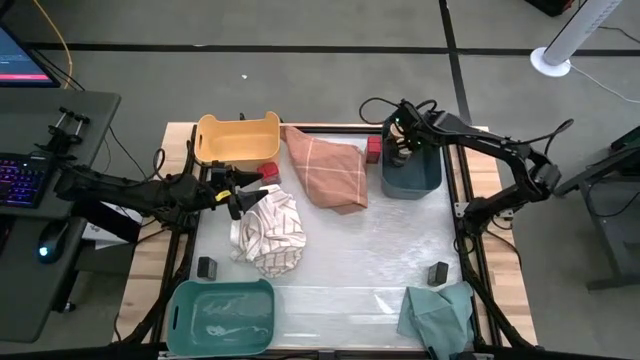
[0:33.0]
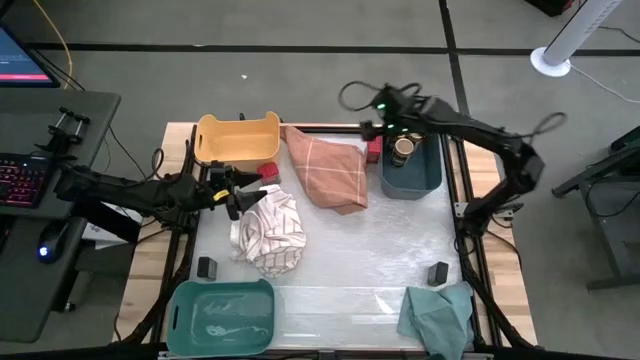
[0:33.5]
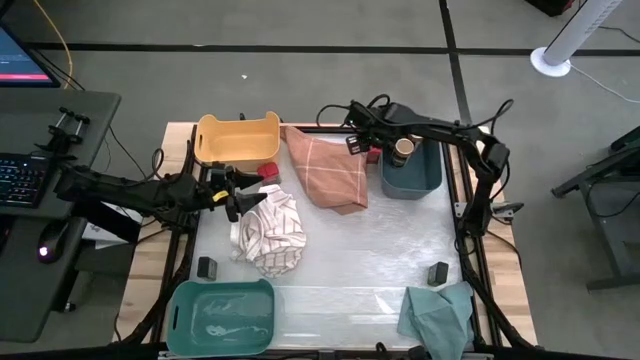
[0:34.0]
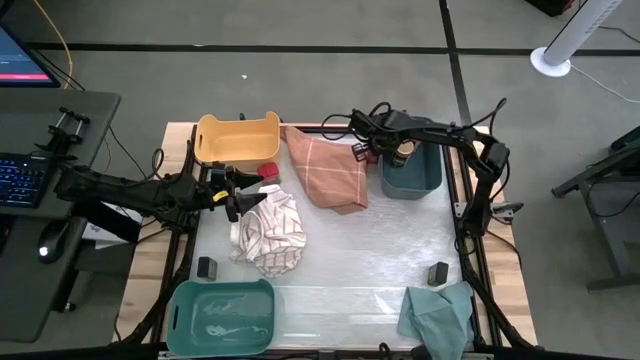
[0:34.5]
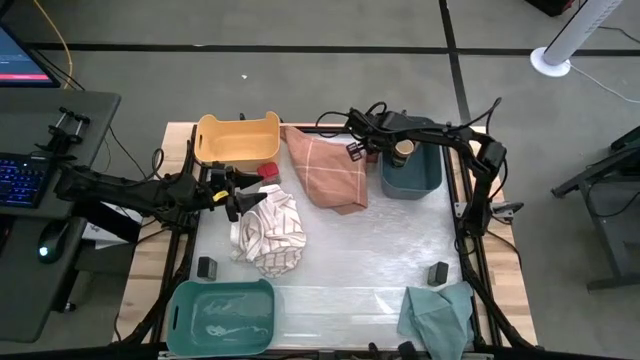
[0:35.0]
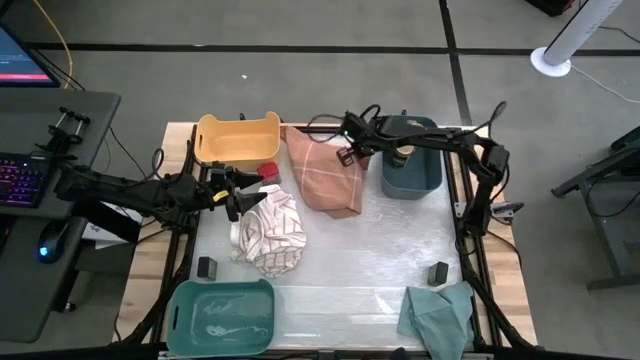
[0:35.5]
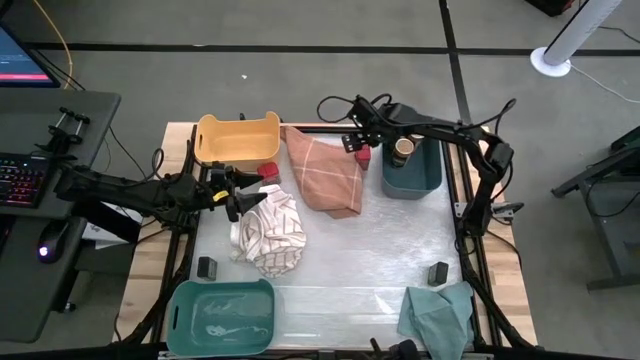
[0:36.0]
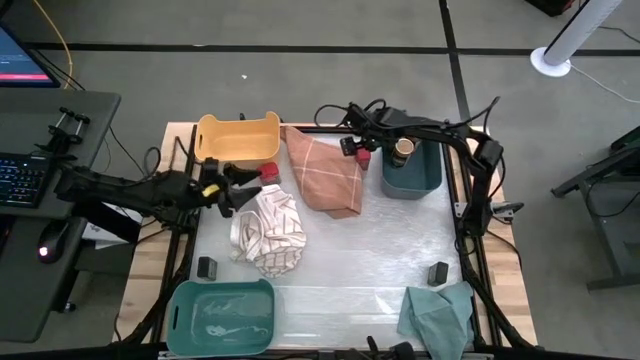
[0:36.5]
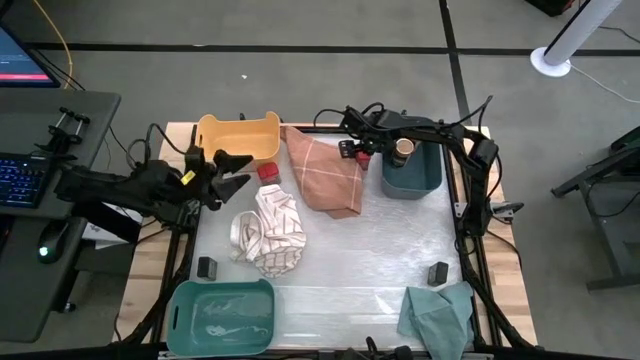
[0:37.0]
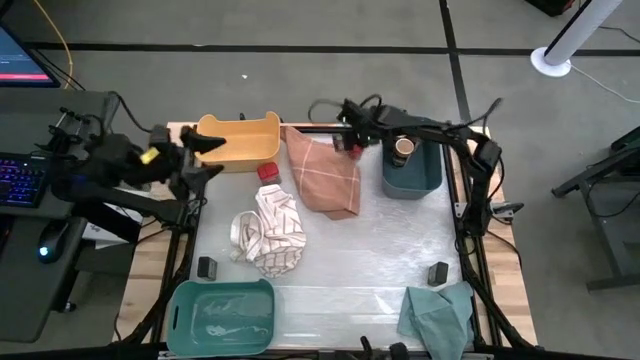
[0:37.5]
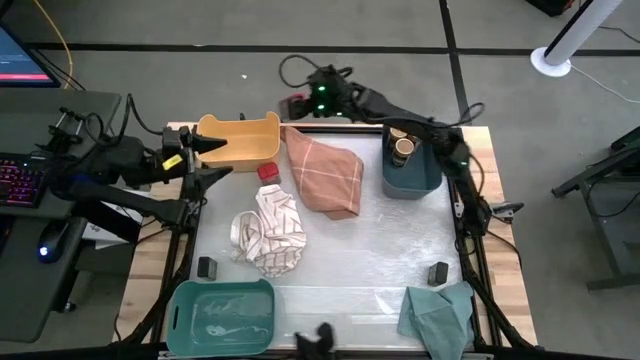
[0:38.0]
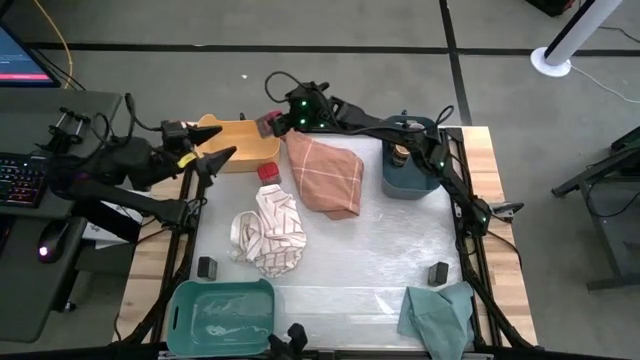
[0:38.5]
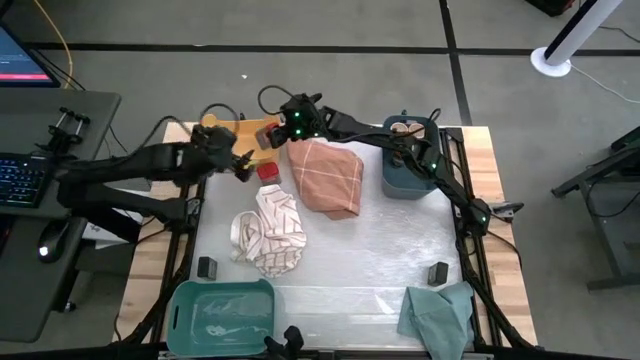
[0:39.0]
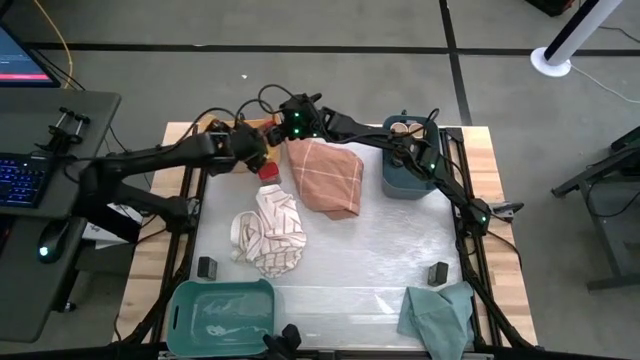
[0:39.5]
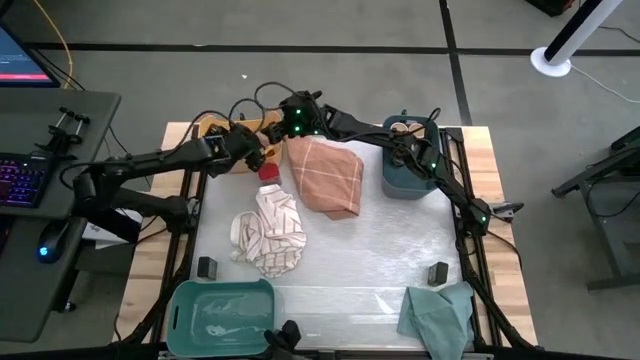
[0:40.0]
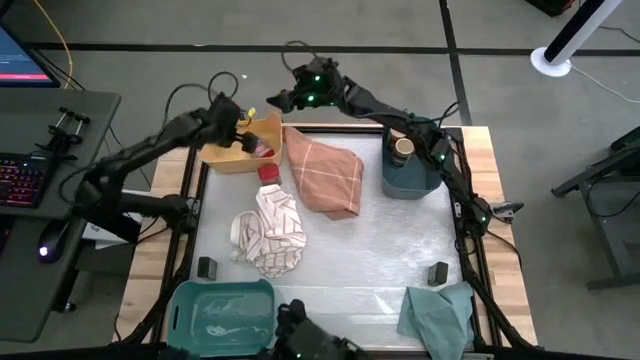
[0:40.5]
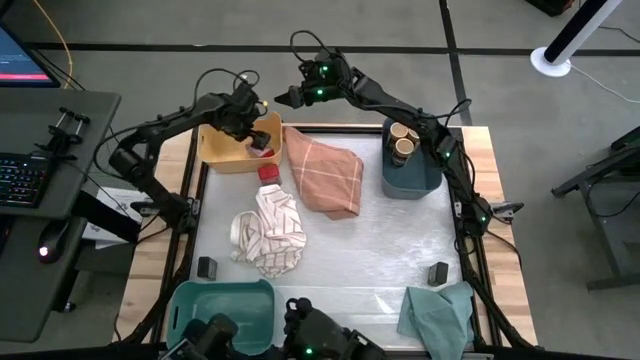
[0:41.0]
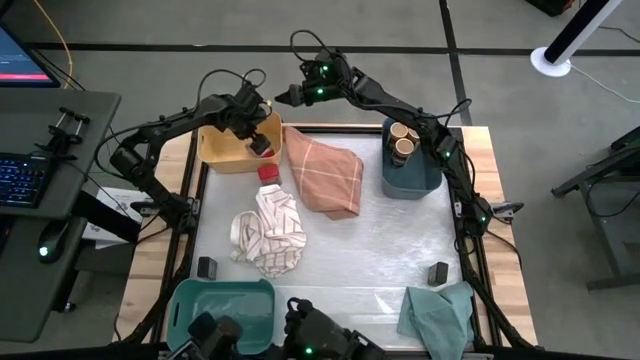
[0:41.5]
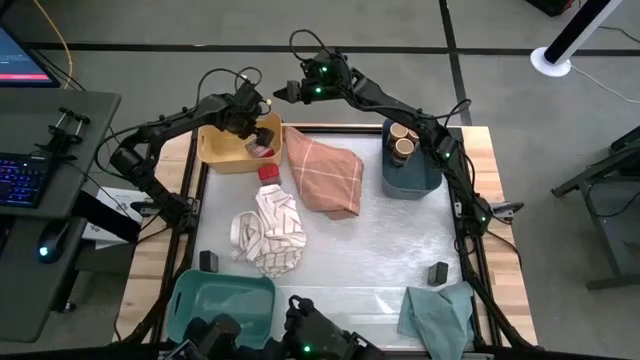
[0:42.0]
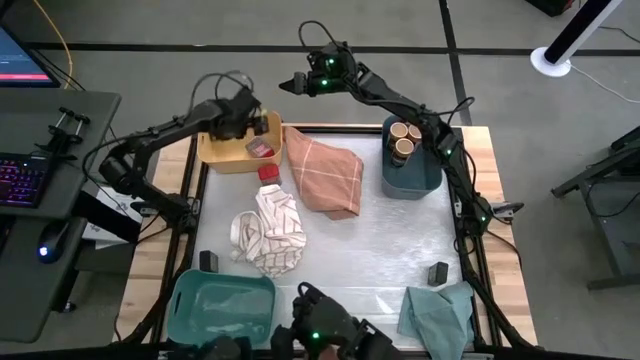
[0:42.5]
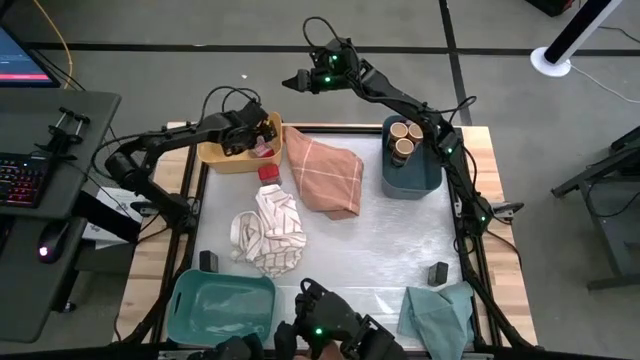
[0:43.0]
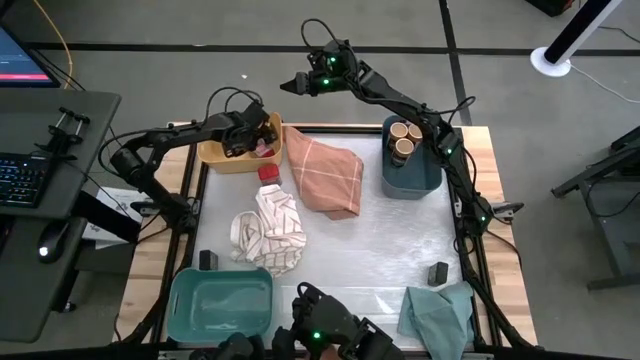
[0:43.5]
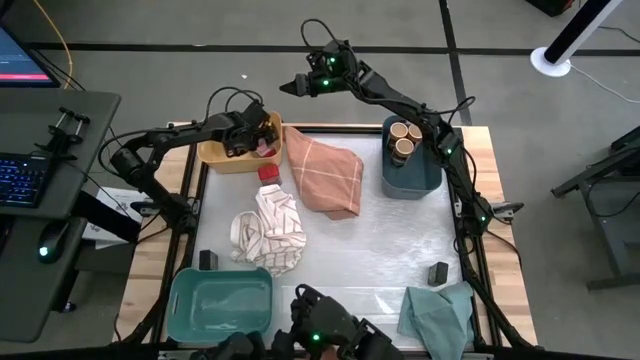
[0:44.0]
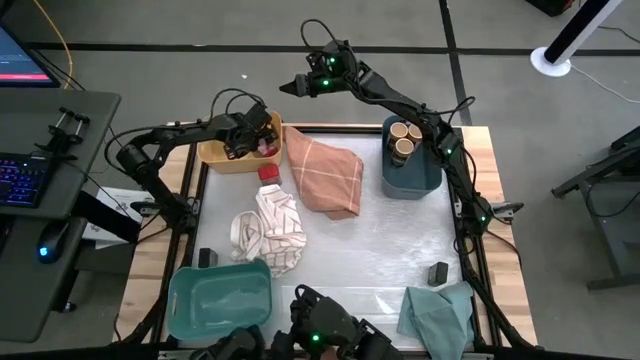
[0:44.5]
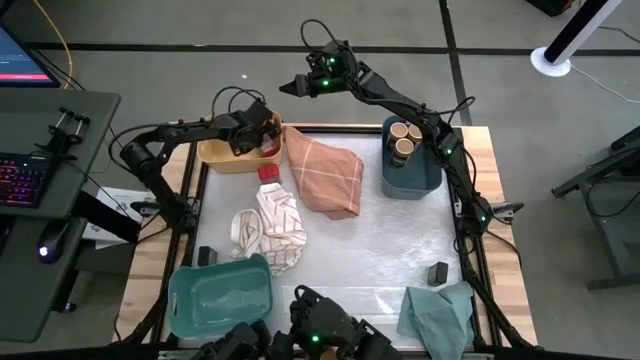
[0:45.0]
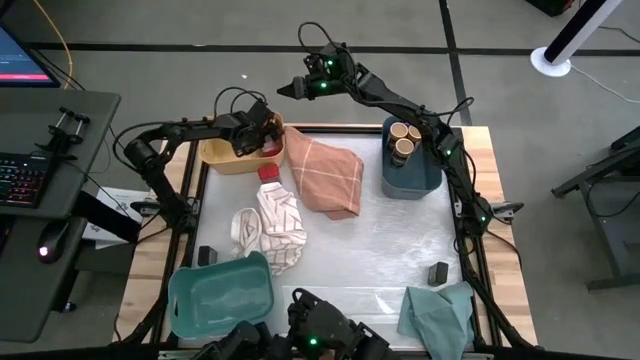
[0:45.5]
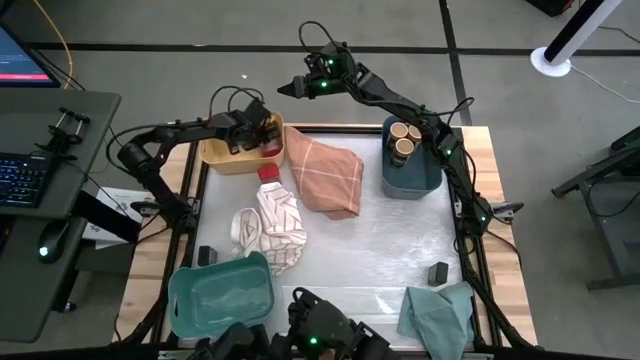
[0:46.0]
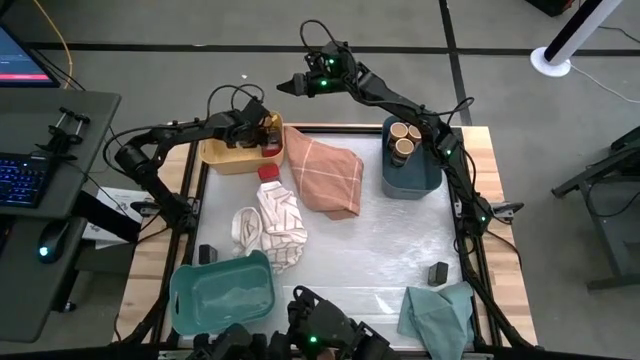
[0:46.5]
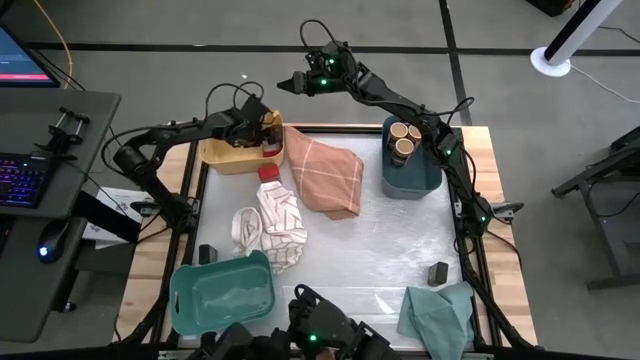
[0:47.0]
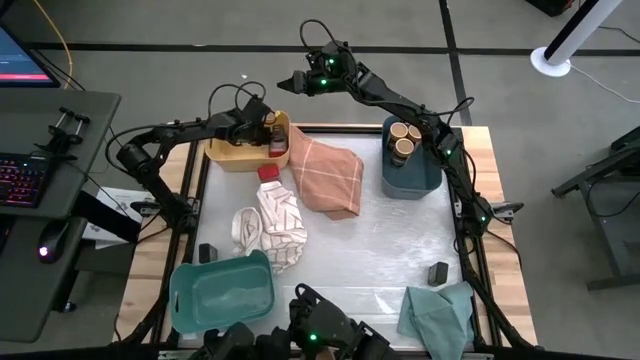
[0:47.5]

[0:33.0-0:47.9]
Task: Sort spices by type
Put the right red seasoning can into the yellow bin

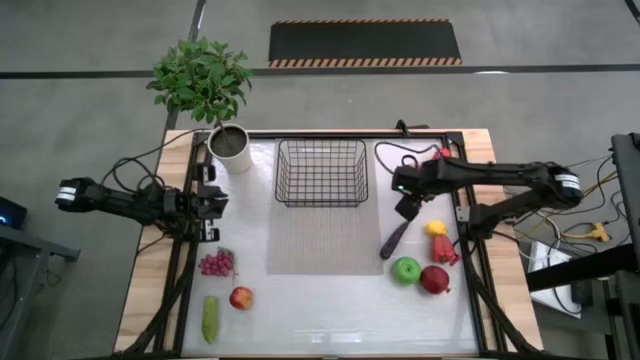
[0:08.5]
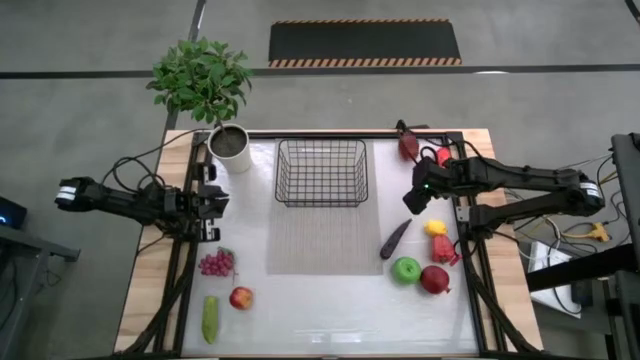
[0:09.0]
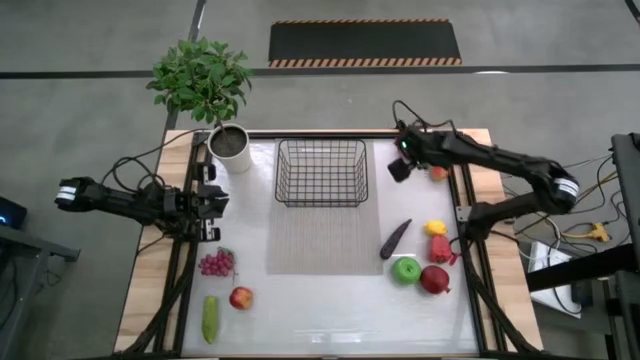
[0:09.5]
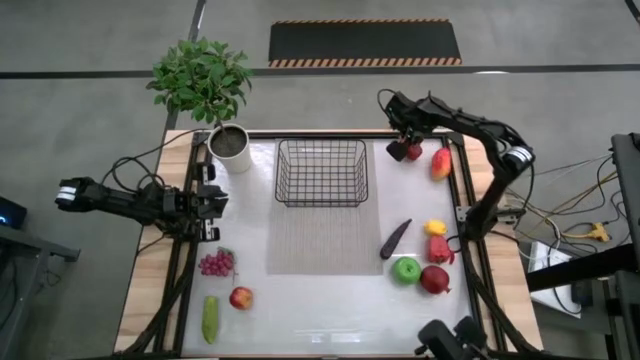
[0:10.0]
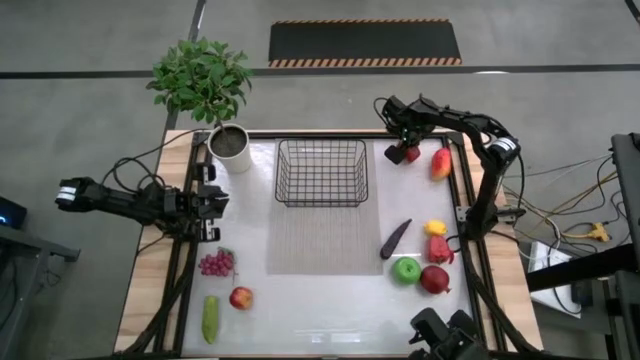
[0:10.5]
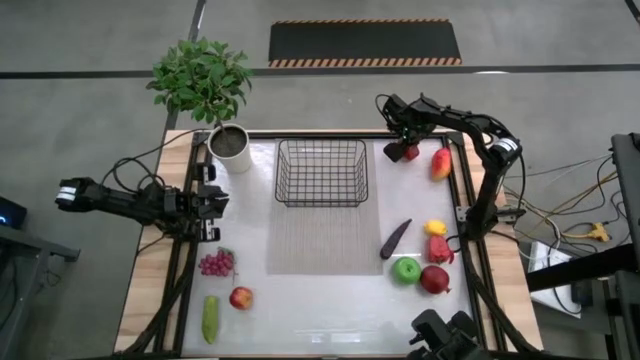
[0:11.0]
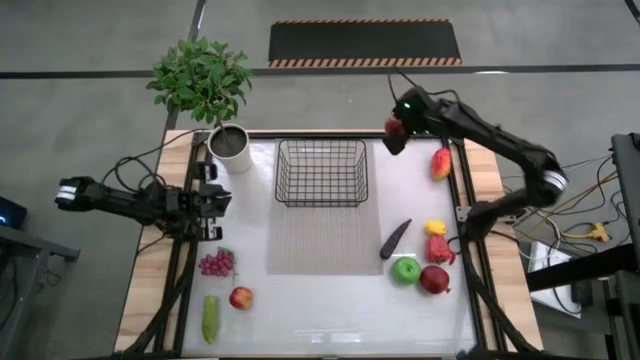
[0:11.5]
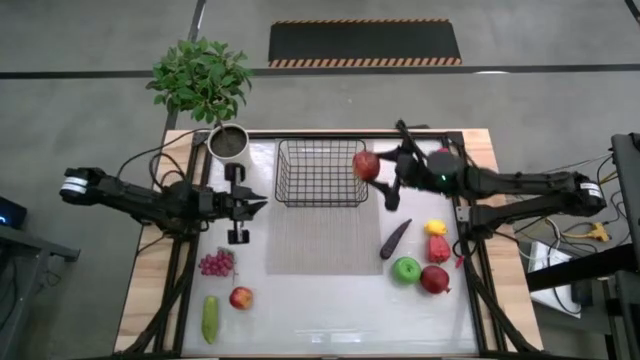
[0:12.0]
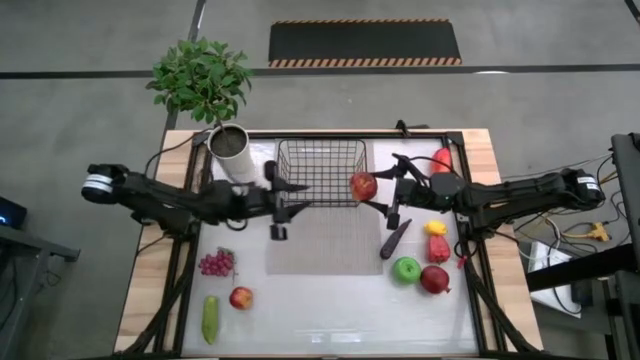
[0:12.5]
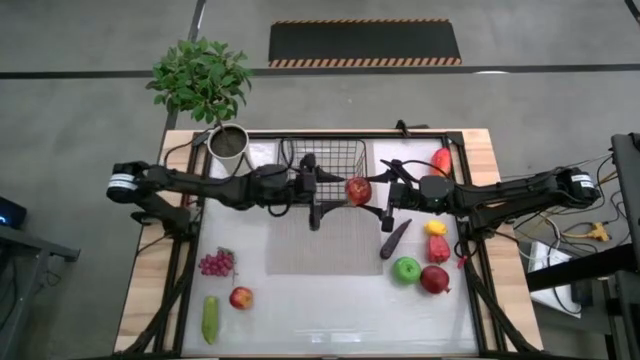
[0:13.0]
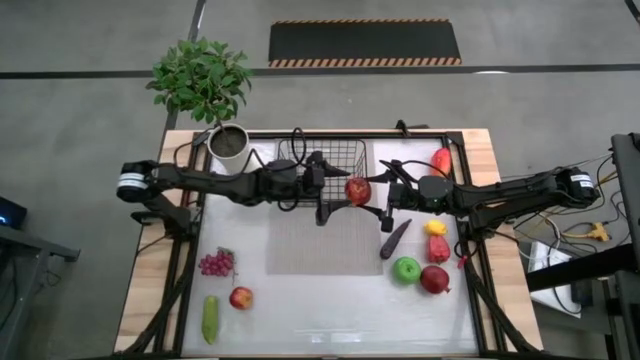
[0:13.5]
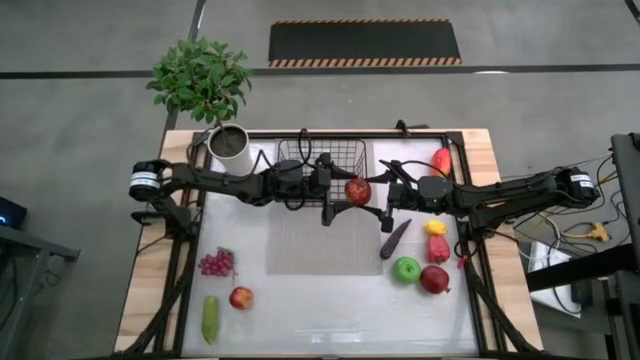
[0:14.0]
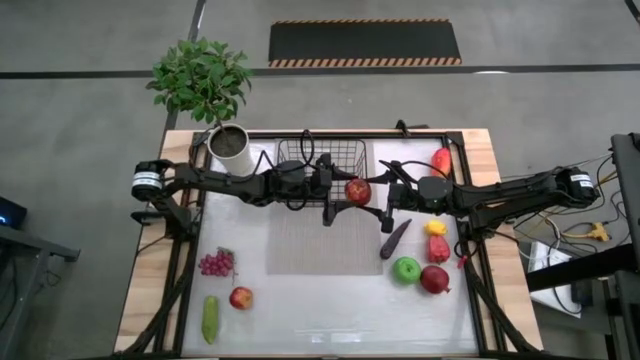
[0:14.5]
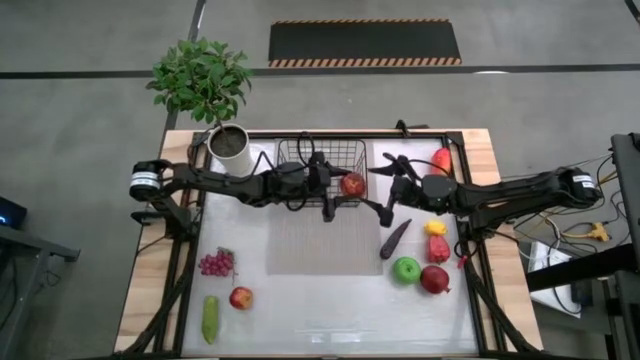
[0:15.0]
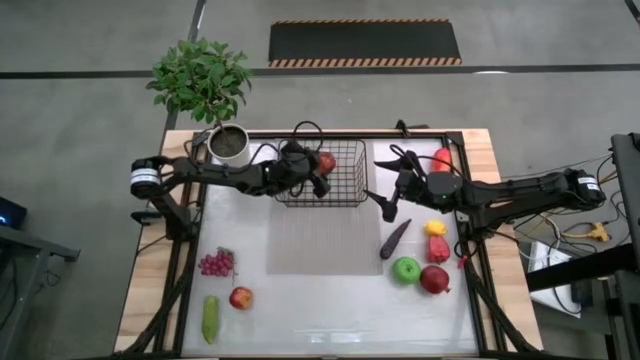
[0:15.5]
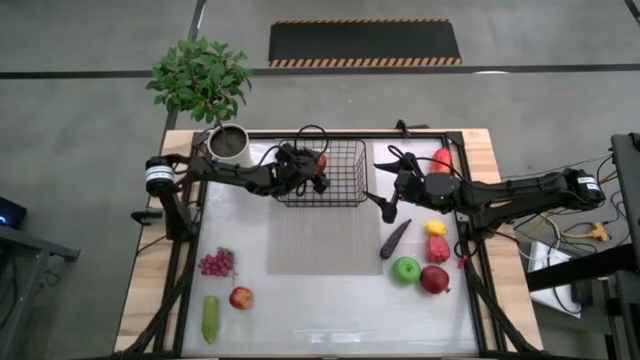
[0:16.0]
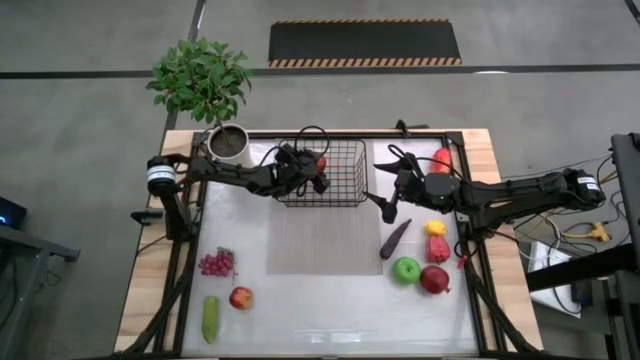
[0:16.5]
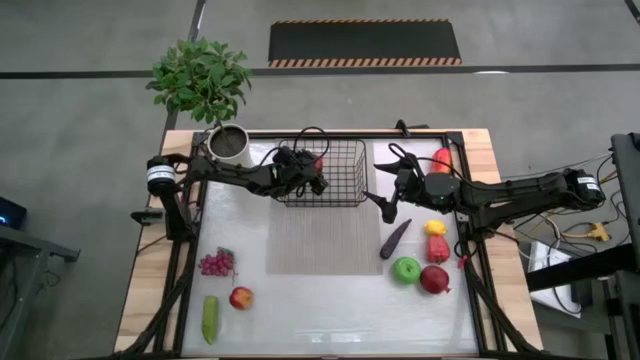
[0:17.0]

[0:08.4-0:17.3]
Task: Build produce basket
Put the top red apple into the wire basket
